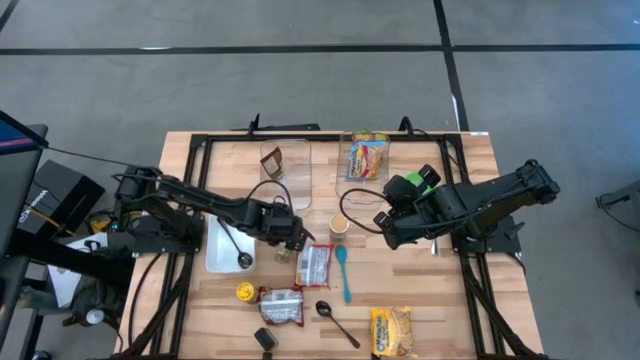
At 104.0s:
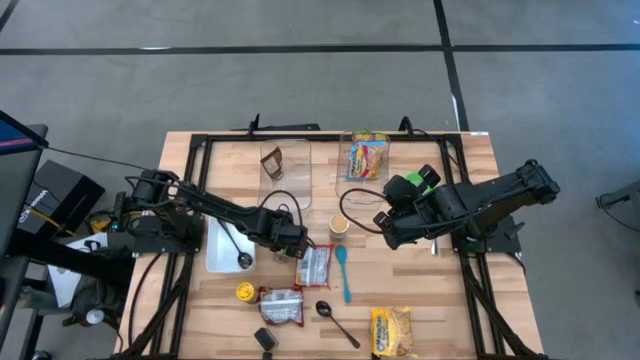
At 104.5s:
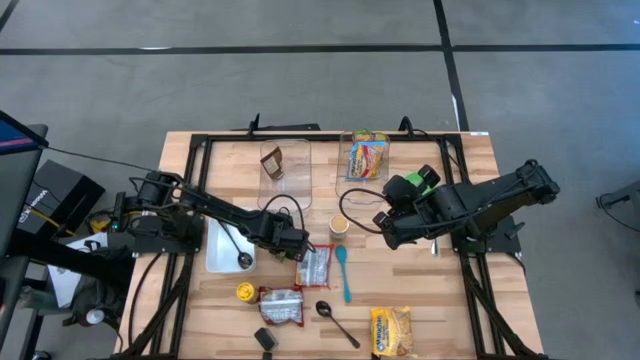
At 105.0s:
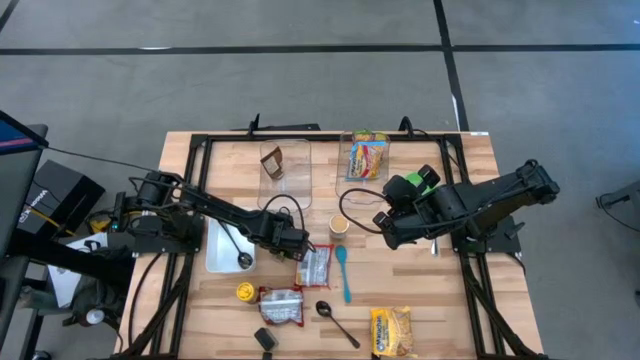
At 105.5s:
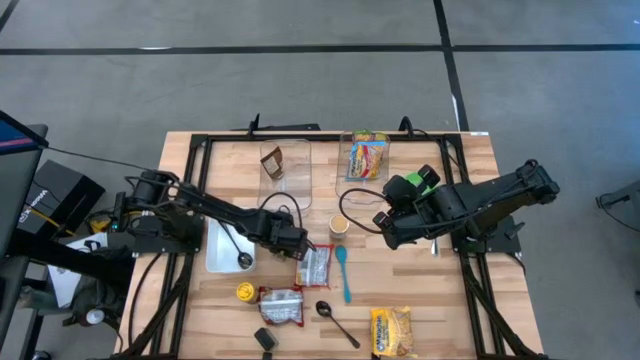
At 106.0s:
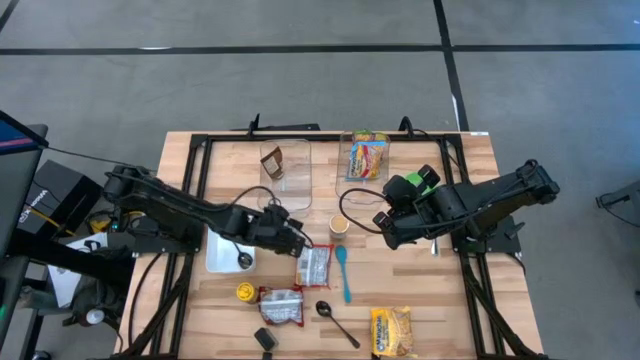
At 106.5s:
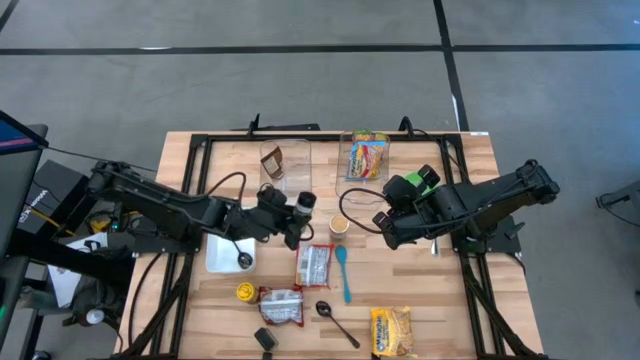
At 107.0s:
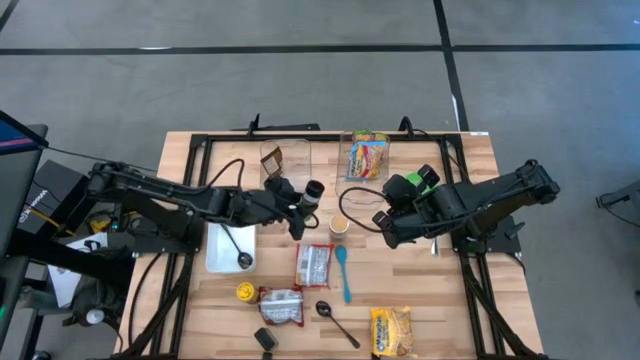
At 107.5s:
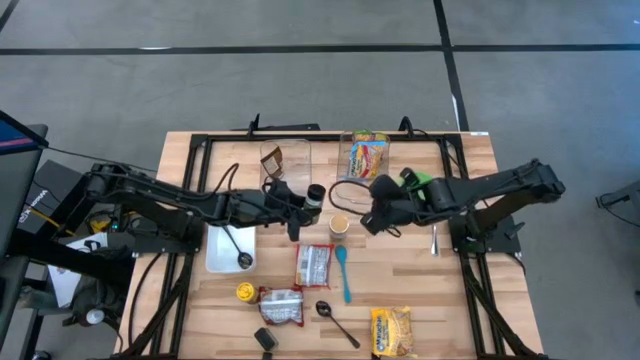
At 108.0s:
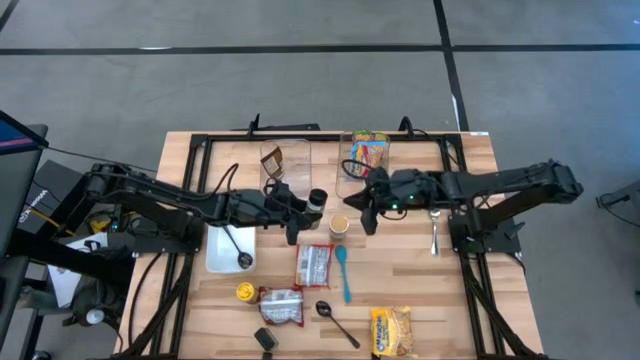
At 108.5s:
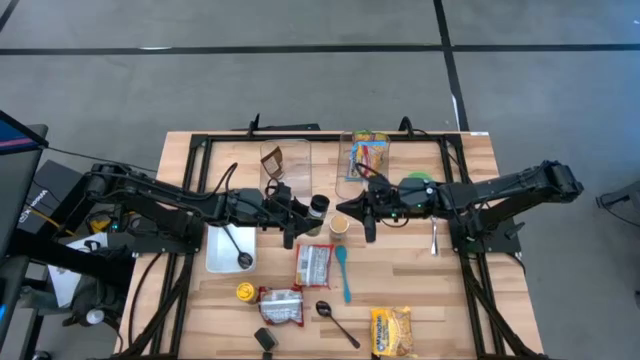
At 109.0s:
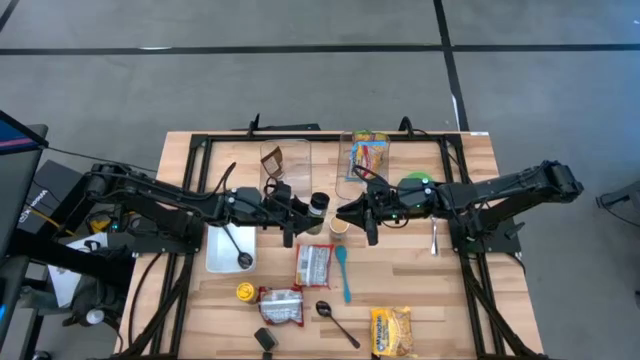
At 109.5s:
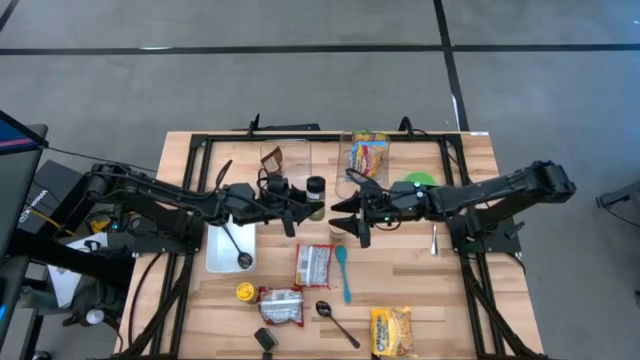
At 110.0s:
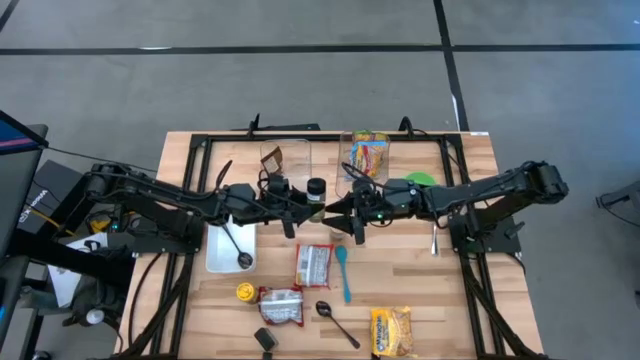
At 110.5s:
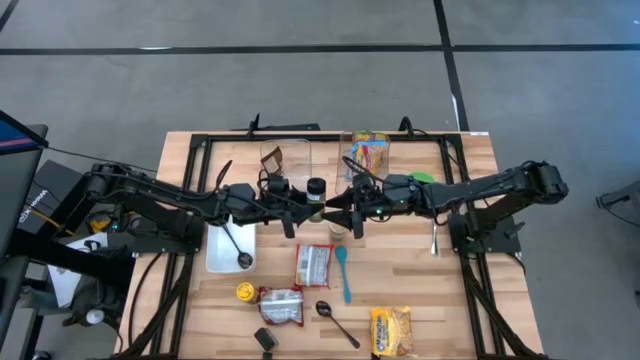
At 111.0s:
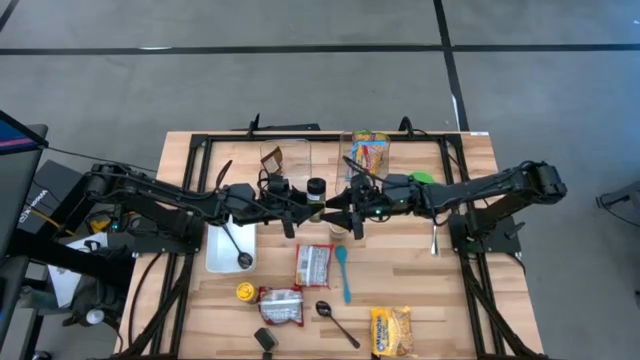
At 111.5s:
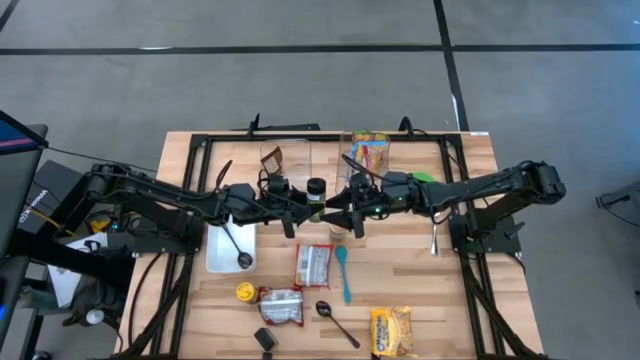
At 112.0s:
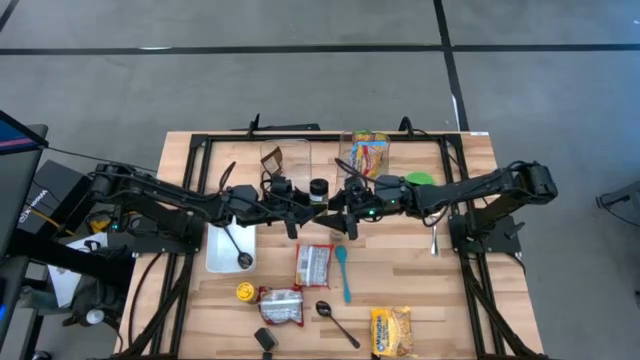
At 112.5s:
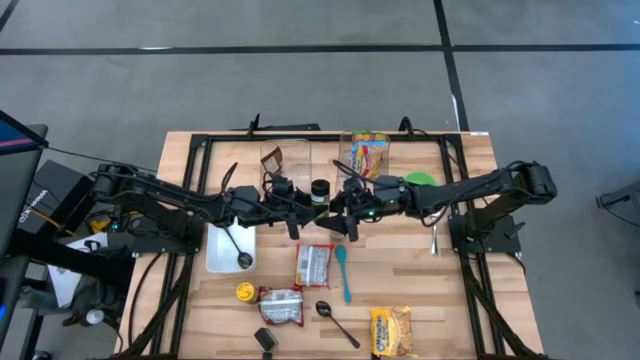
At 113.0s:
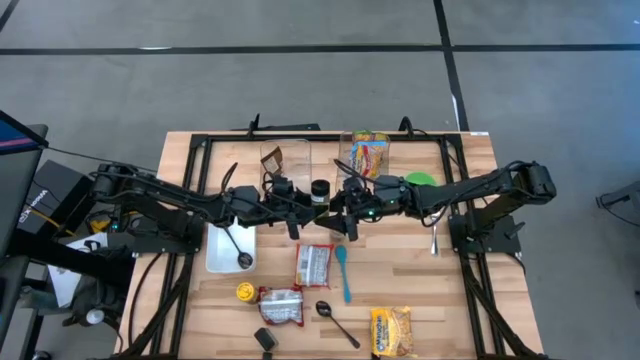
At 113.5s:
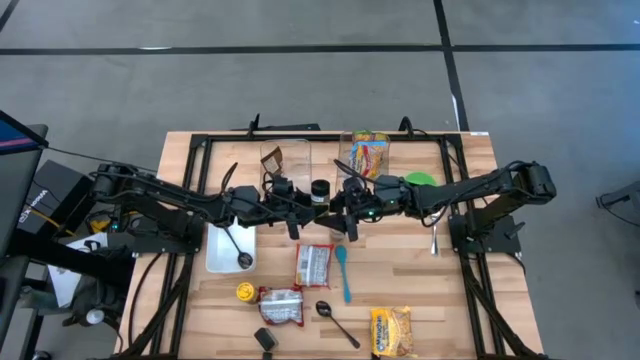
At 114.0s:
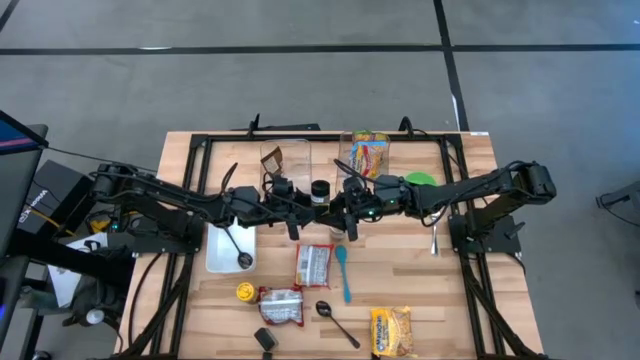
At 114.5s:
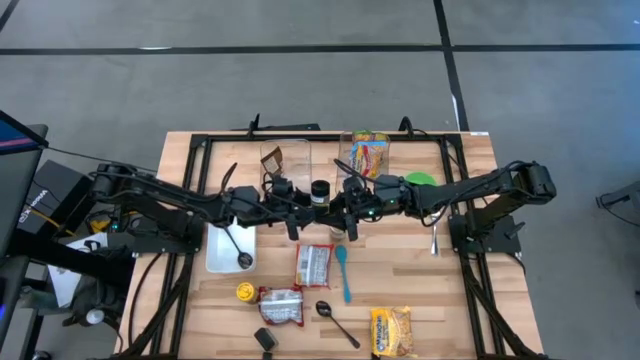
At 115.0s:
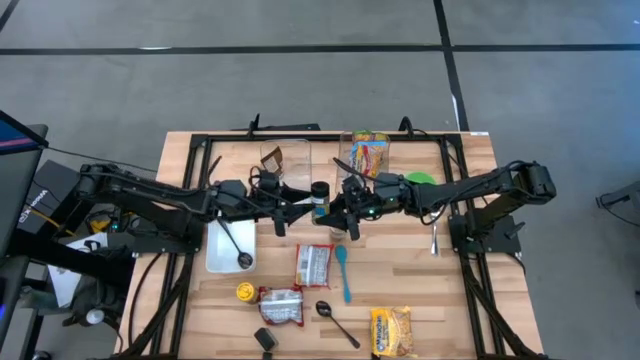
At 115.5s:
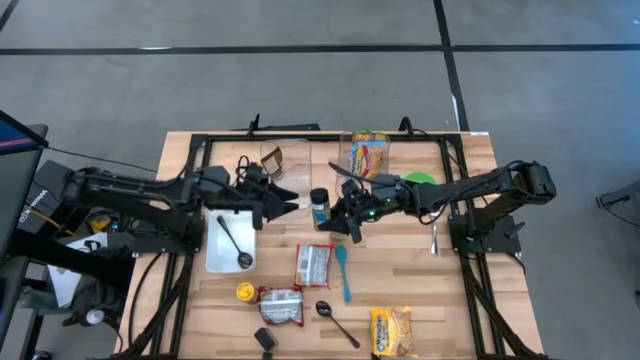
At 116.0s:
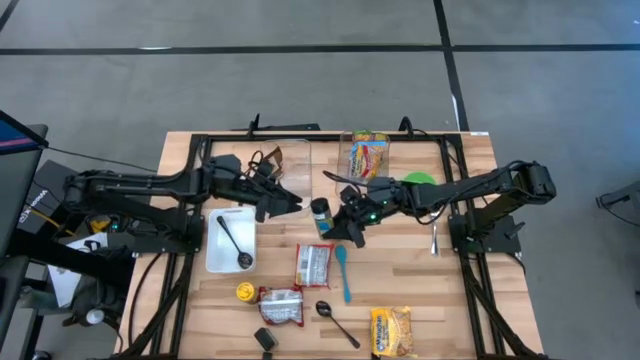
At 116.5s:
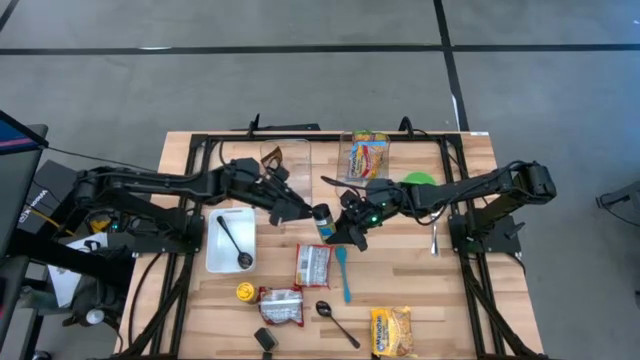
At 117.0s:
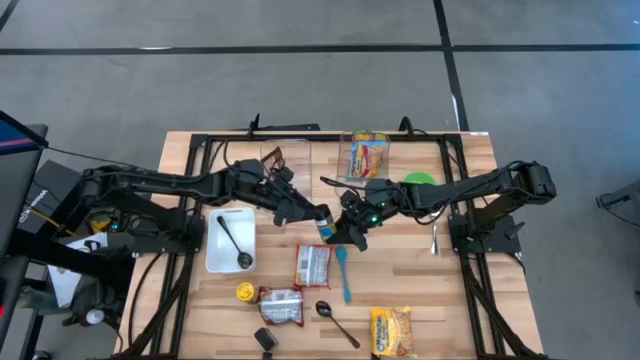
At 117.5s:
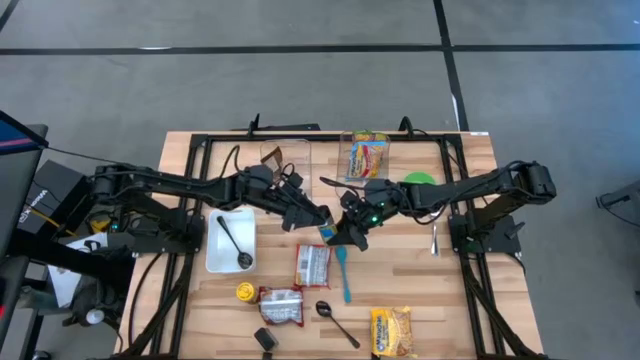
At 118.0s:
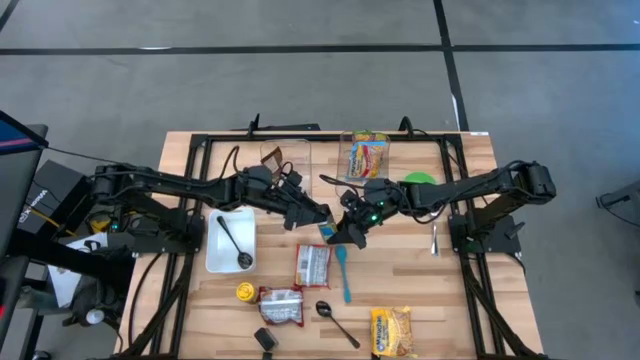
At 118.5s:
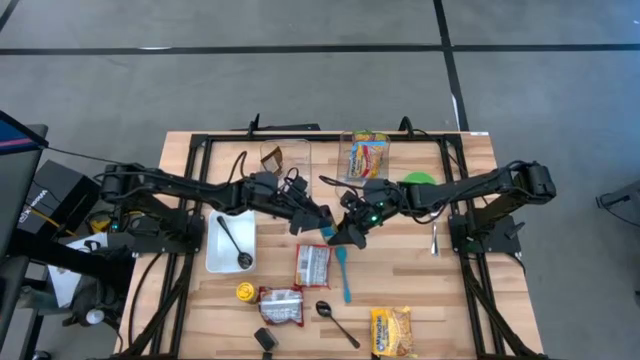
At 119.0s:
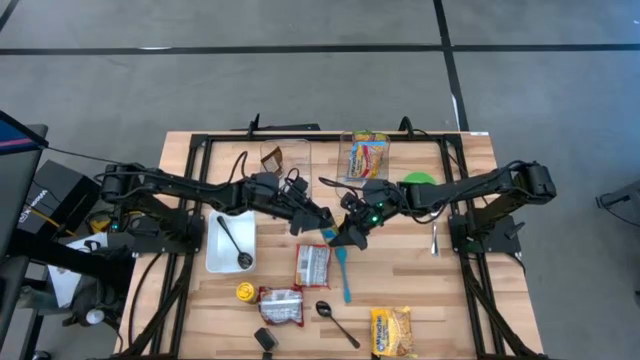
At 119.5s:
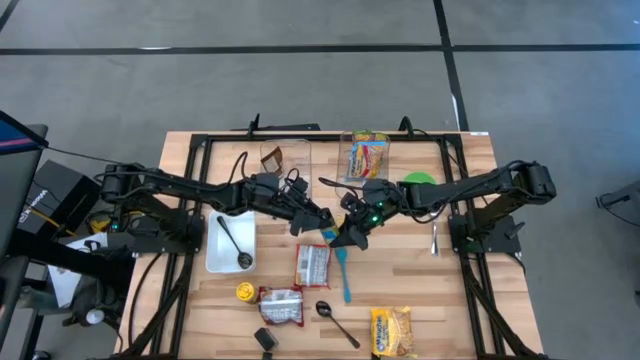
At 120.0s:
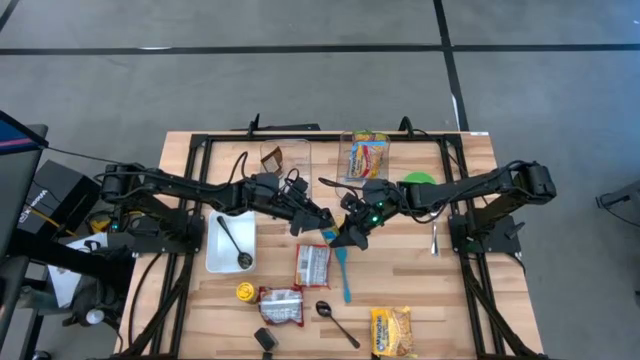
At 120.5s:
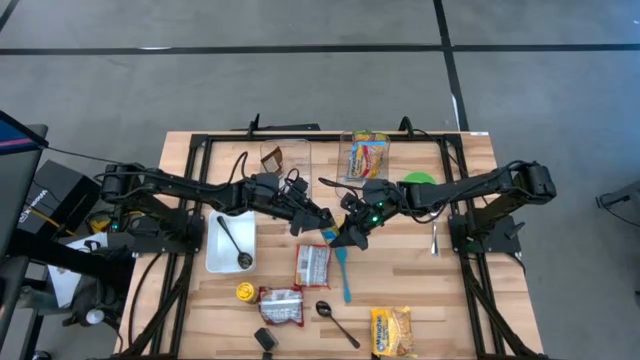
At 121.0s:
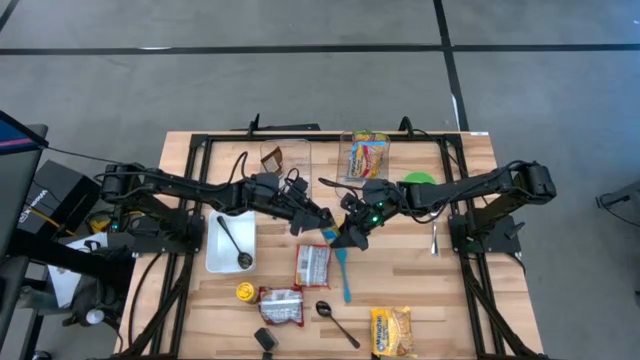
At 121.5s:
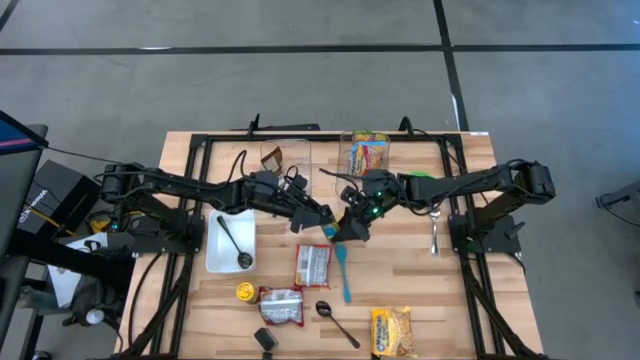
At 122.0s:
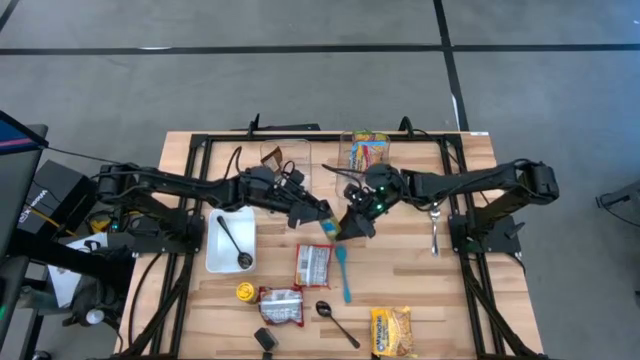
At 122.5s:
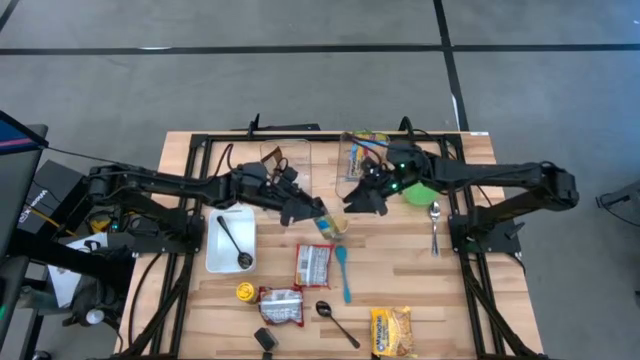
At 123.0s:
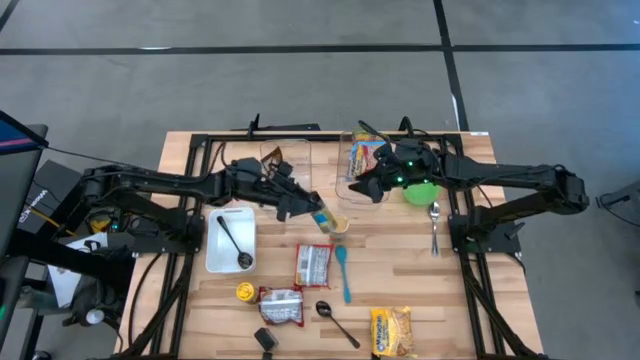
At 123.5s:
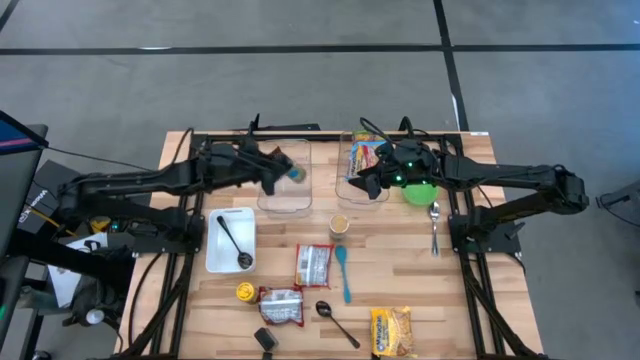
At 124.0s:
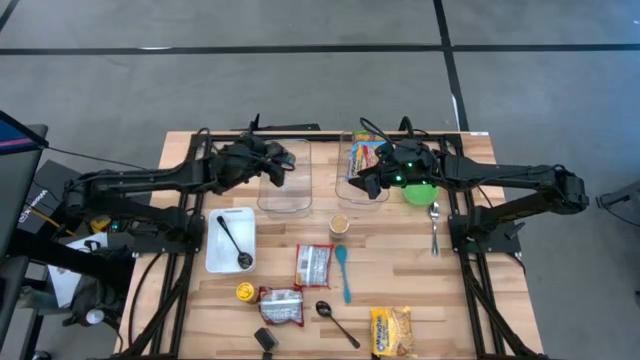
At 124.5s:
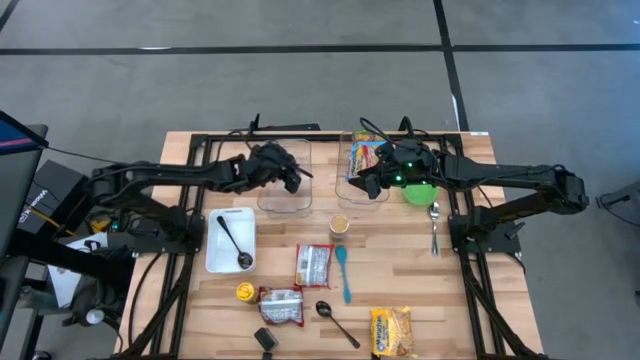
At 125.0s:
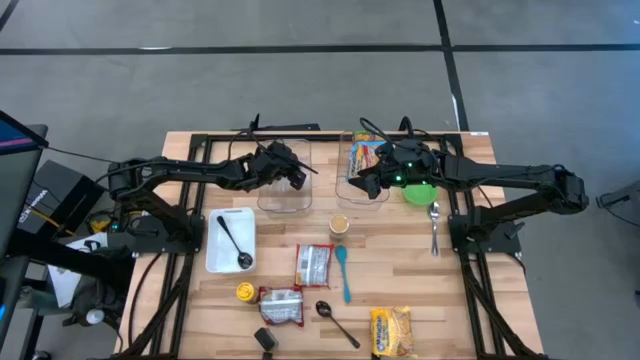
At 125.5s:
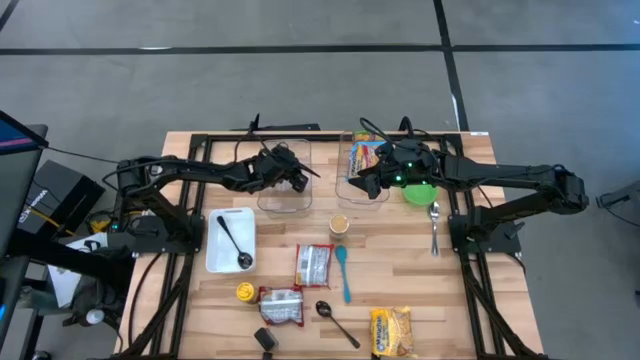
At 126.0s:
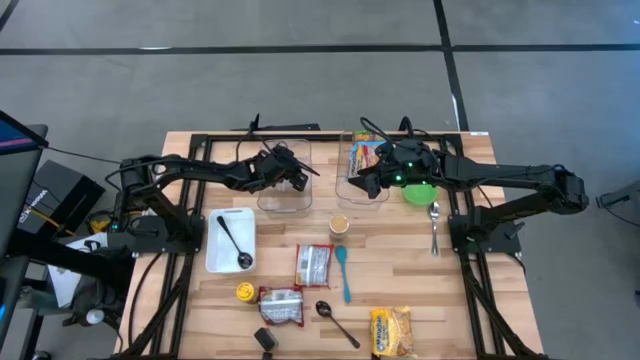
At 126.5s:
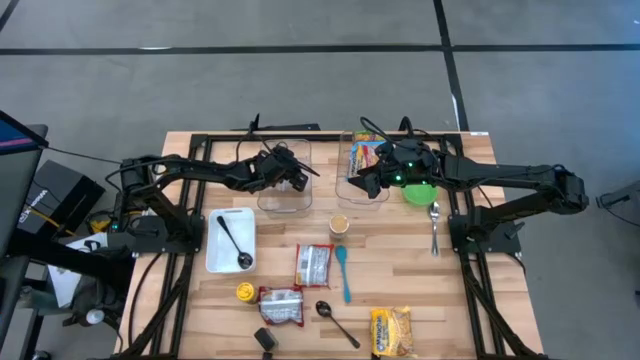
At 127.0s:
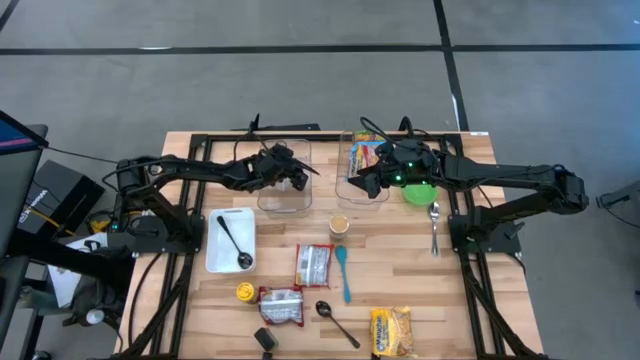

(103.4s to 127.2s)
Task: Pick & Place Food Item
Put the light green seasoning bottle into the left transparent bin
